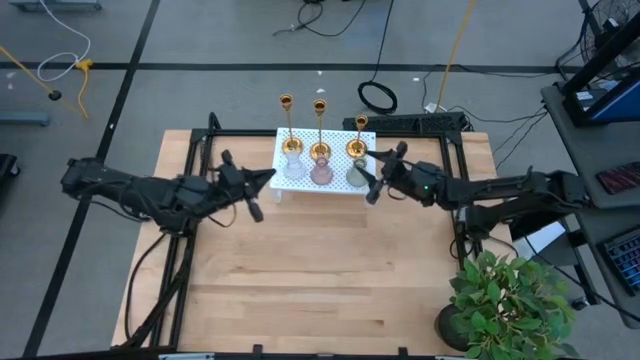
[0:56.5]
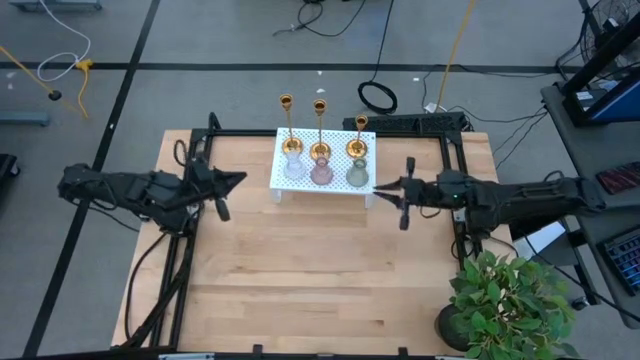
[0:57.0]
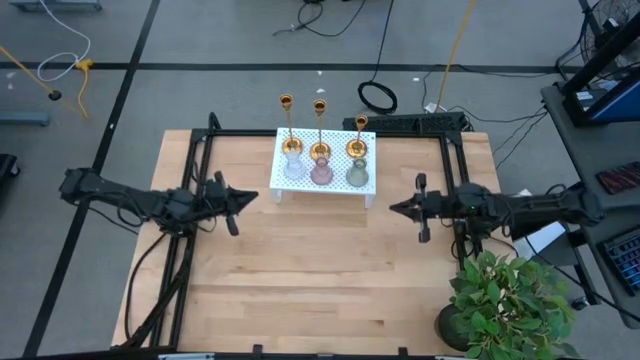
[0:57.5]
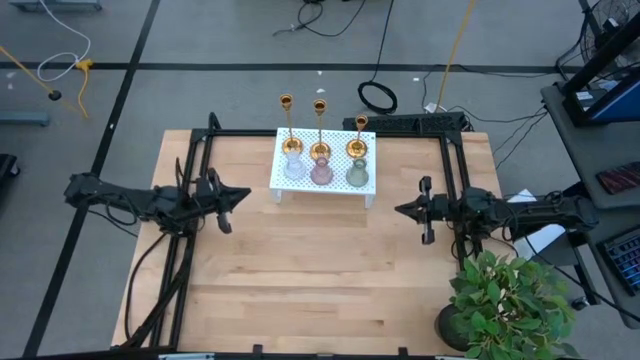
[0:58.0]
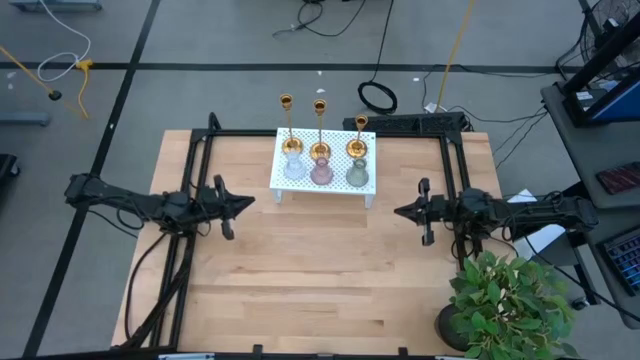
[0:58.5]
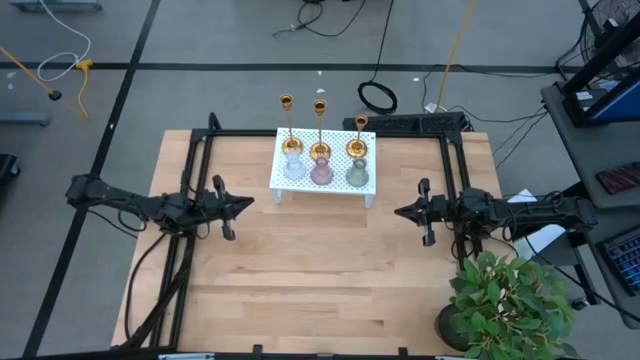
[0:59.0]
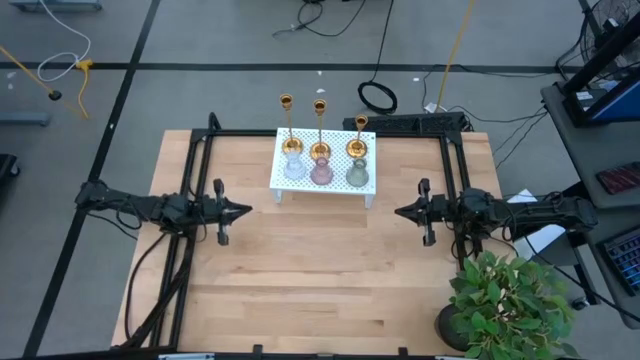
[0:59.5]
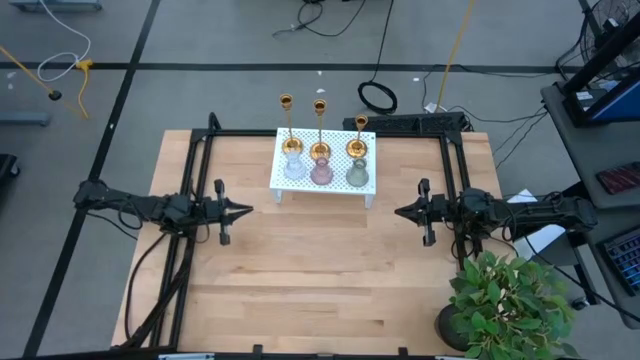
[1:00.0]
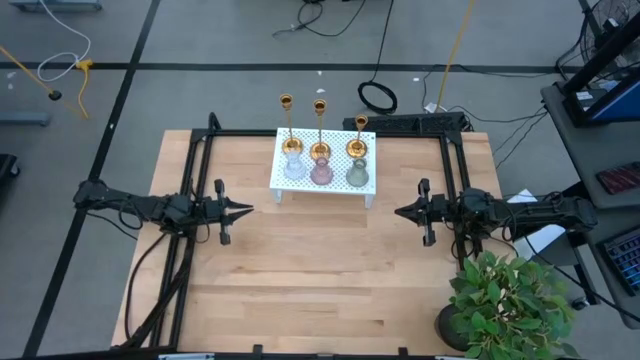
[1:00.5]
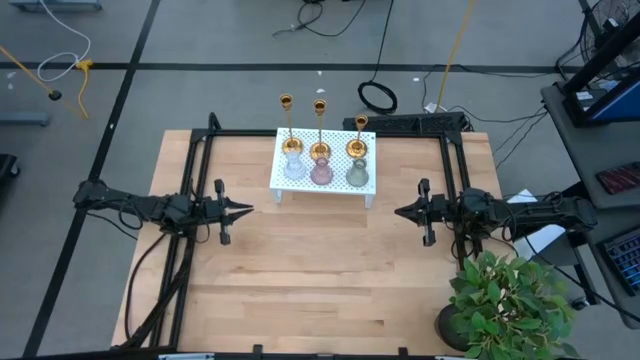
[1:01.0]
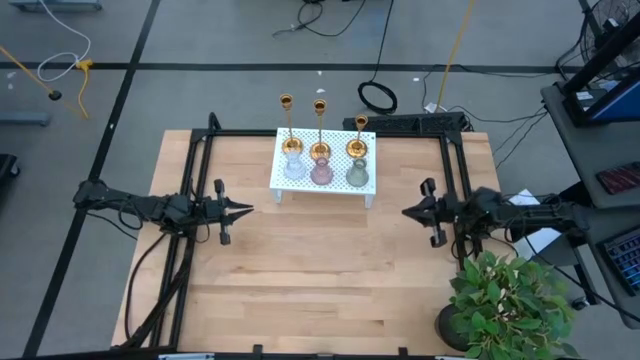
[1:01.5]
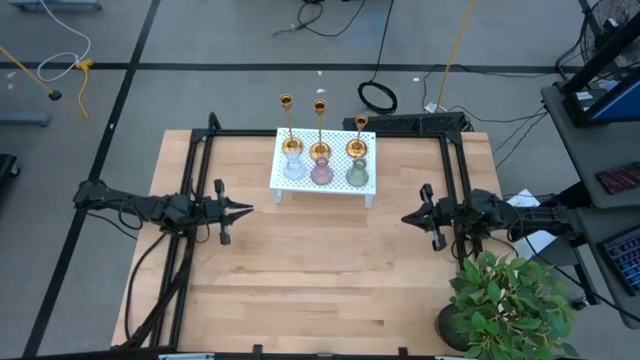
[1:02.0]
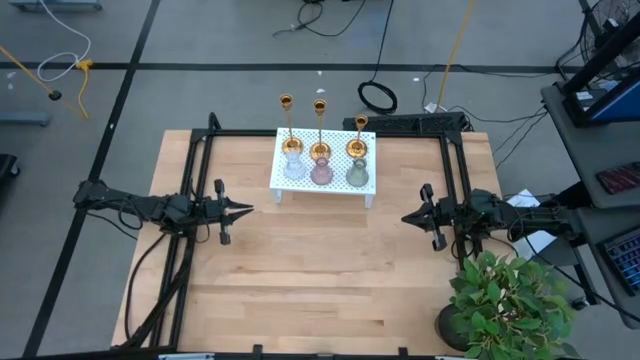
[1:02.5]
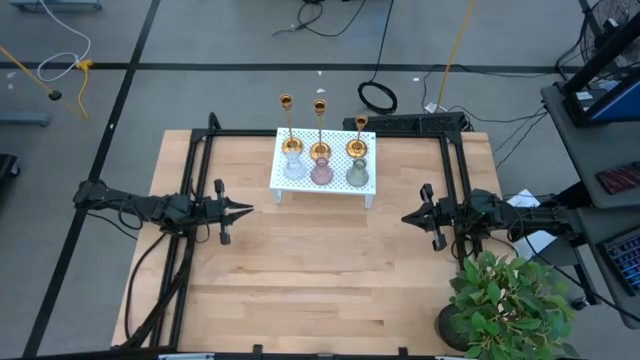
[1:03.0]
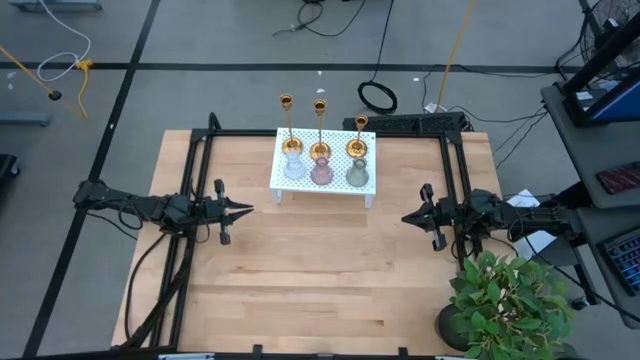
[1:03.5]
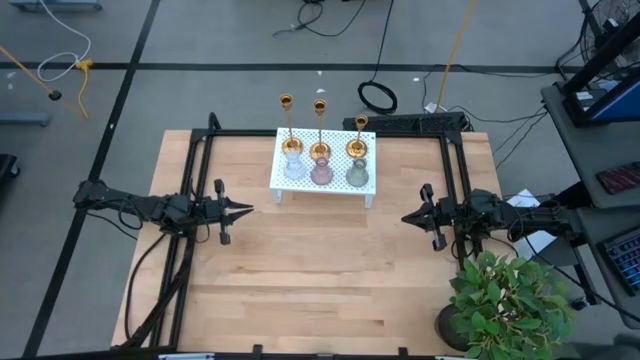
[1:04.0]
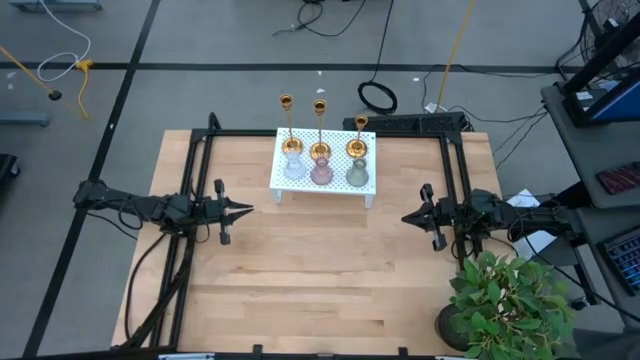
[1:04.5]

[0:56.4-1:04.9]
Task: Pick & Place candle stick holders
Return to Home Position

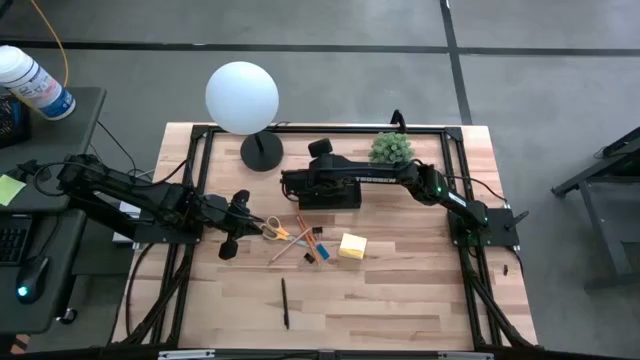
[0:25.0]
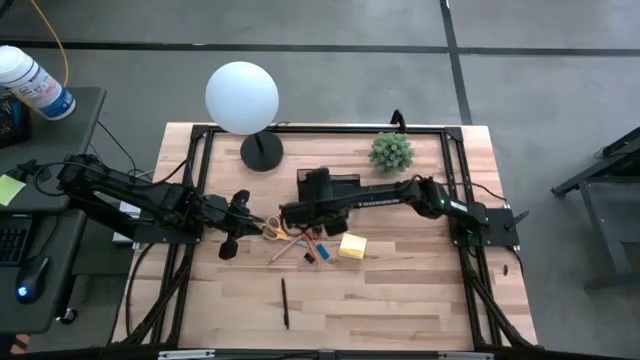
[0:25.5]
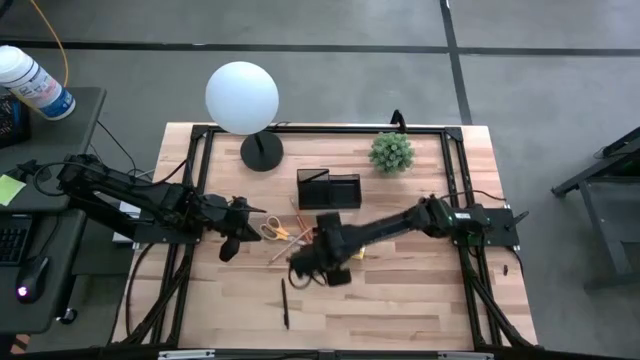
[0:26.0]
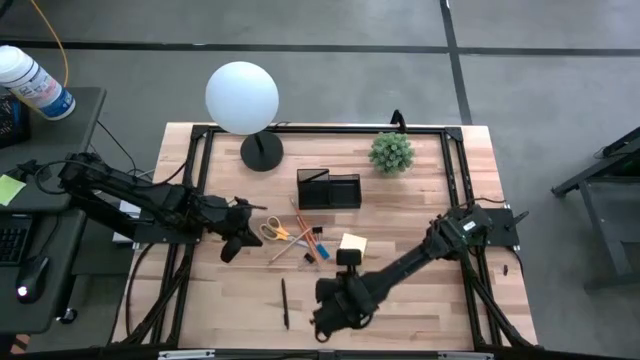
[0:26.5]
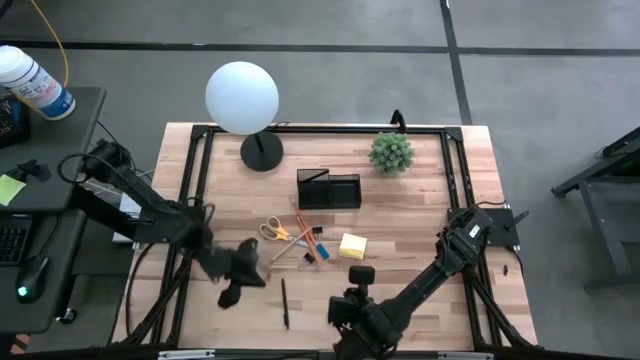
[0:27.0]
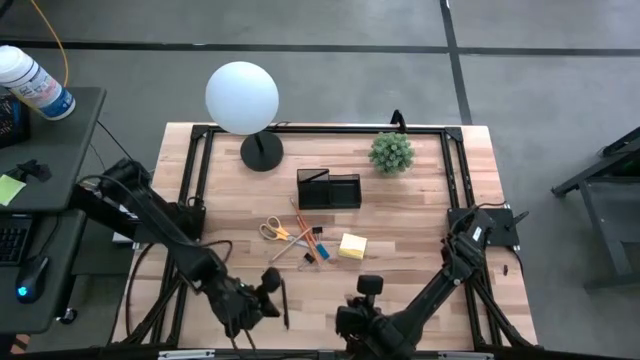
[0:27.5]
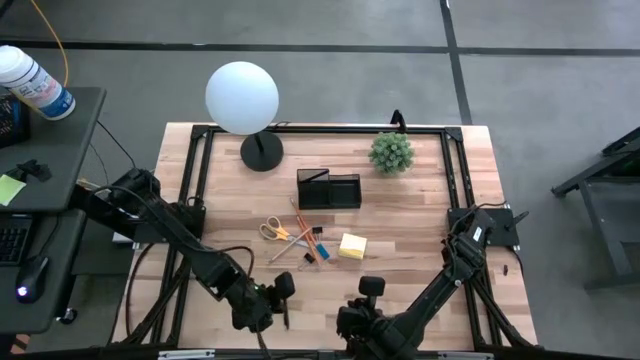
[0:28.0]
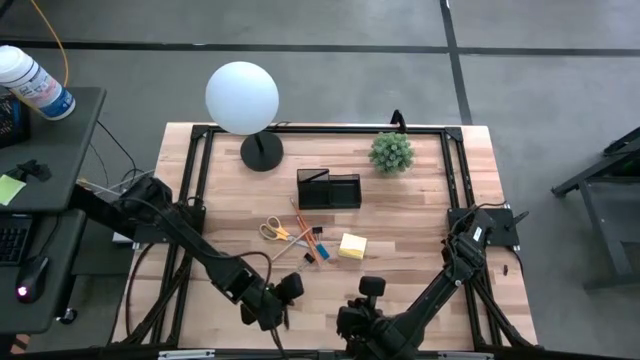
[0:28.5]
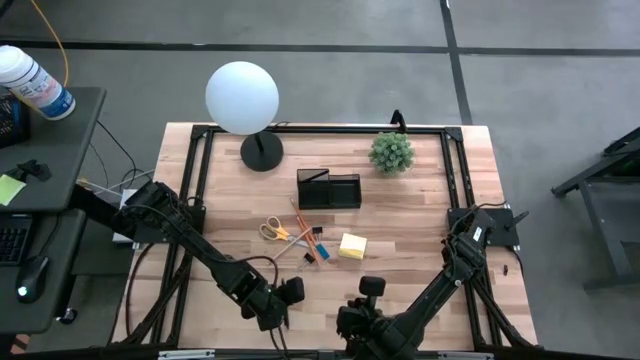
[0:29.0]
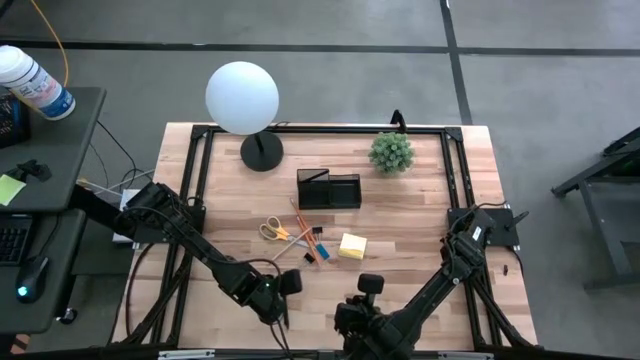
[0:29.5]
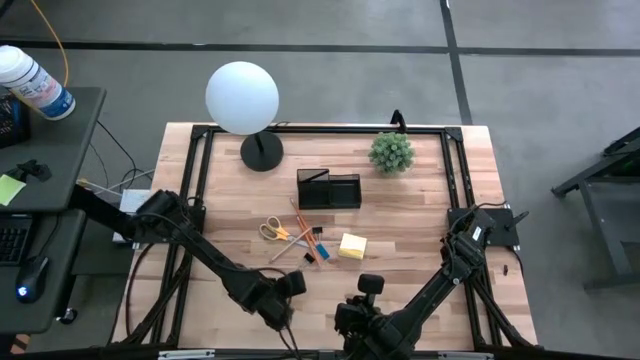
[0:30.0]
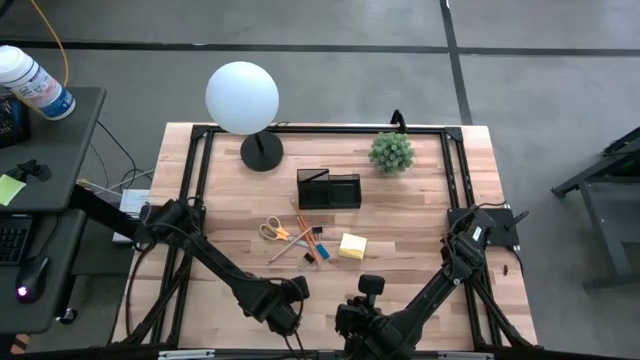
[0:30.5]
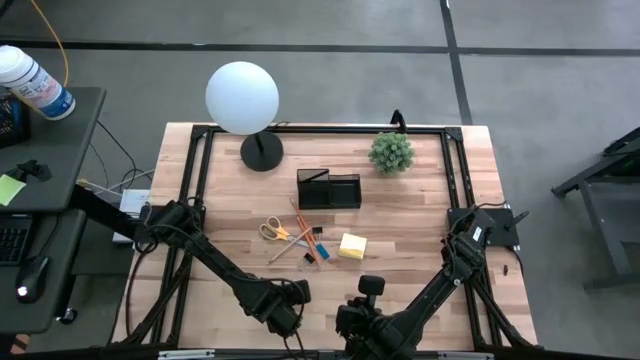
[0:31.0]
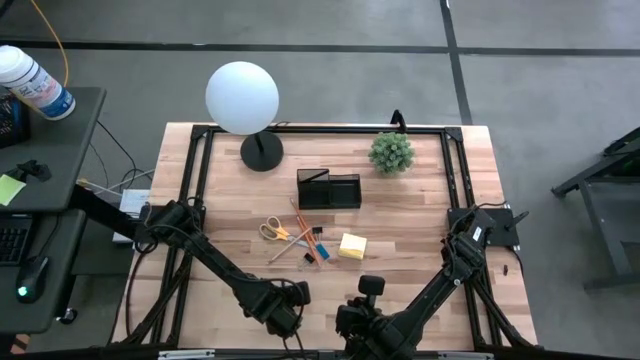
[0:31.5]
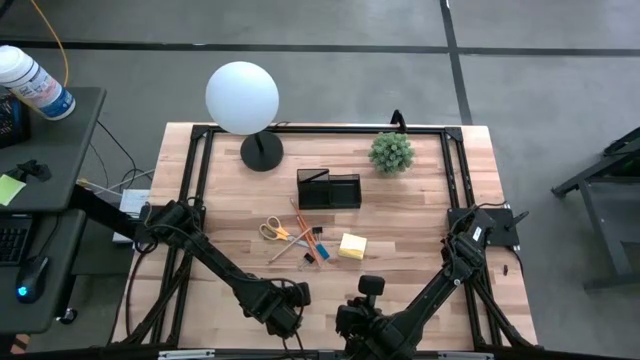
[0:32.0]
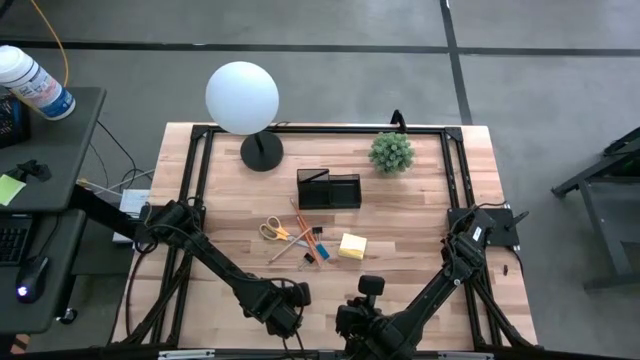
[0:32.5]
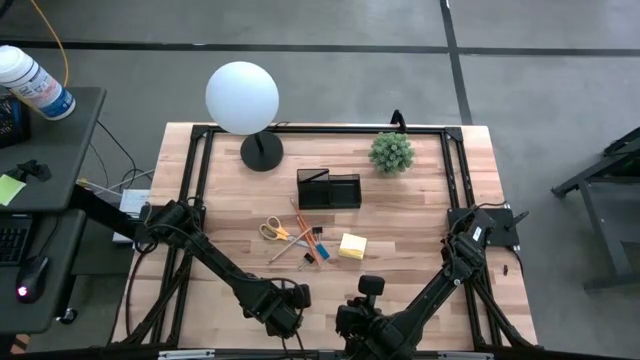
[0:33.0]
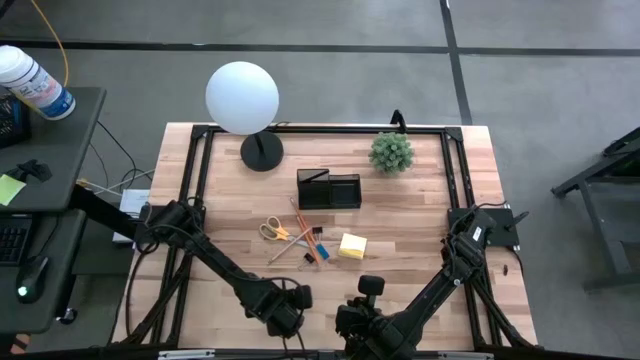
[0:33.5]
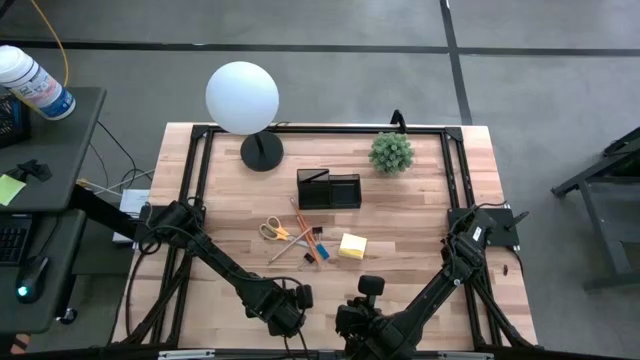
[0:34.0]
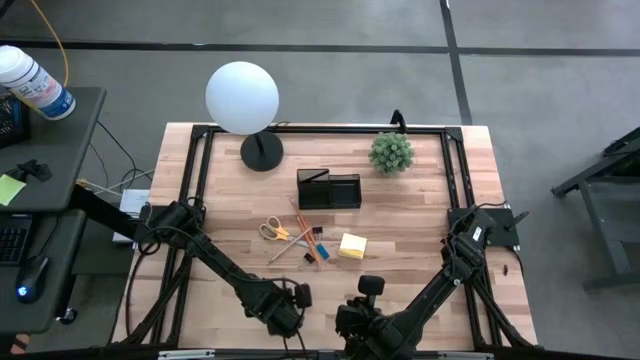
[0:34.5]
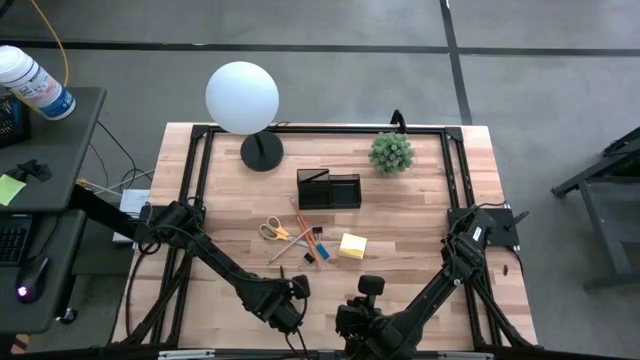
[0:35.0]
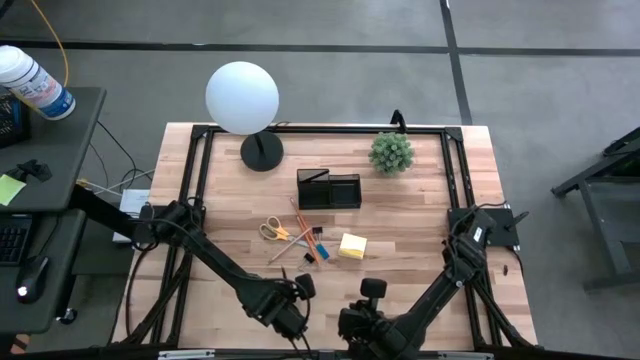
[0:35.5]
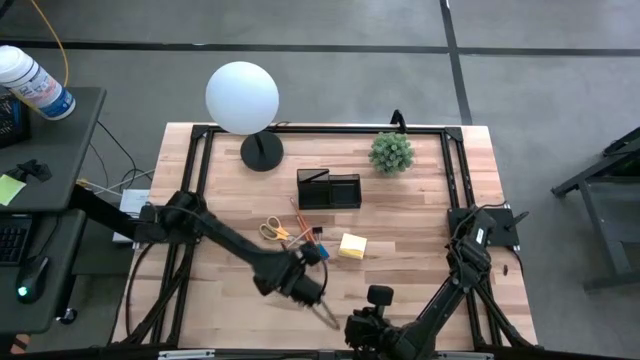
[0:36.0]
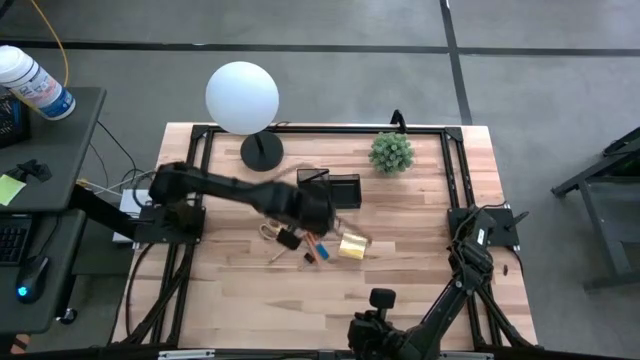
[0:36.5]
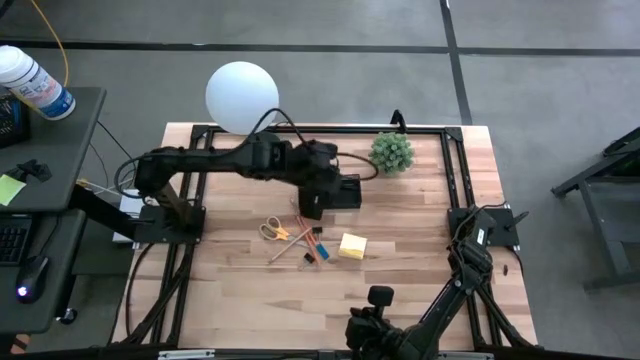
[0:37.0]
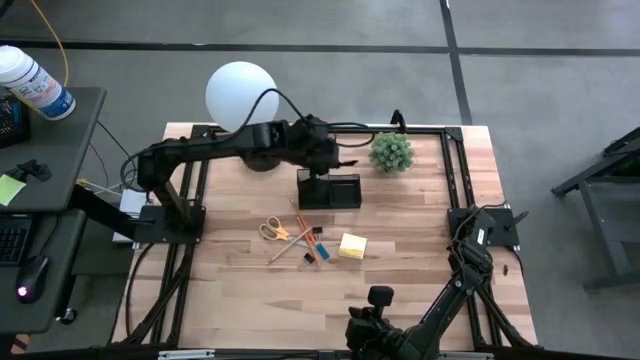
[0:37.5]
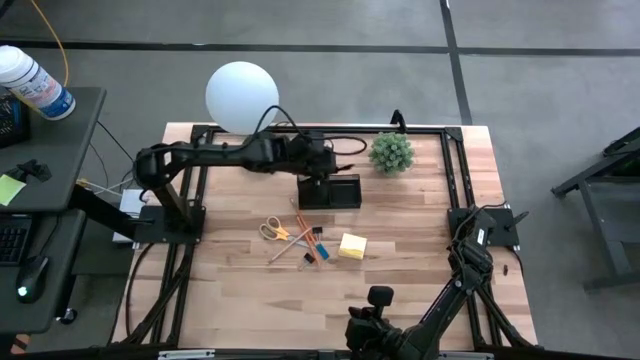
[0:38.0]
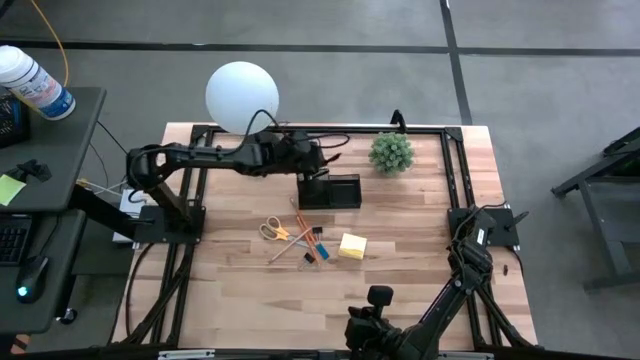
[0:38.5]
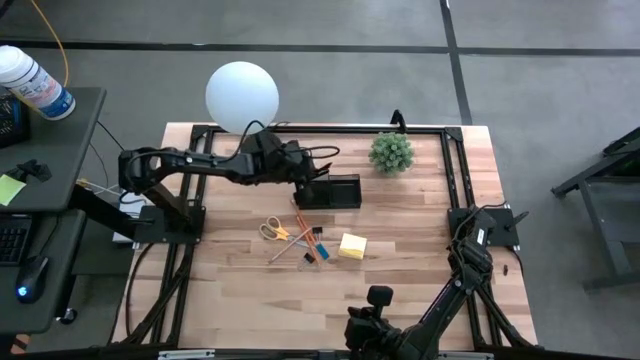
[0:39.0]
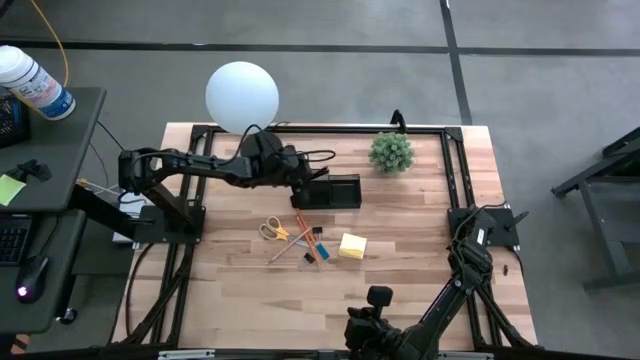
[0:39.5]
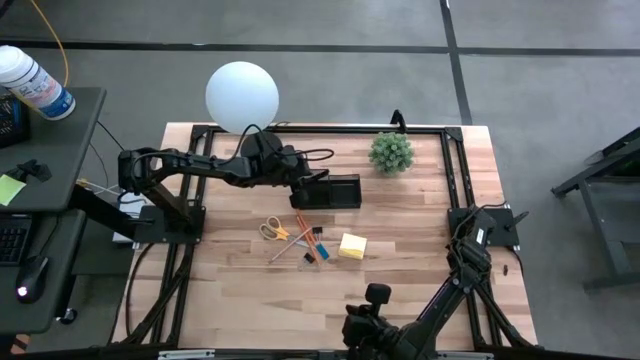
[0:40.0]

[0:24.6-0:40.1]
Task: Pick and place office supplies into organizer
Put the black pen into the black organizer
